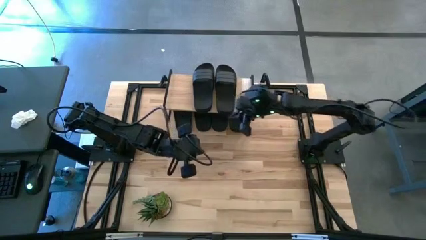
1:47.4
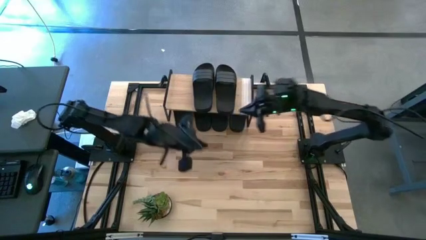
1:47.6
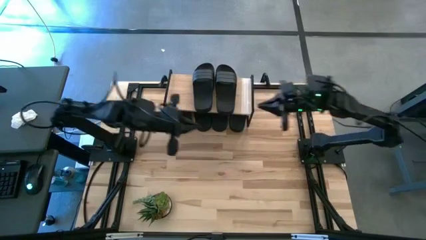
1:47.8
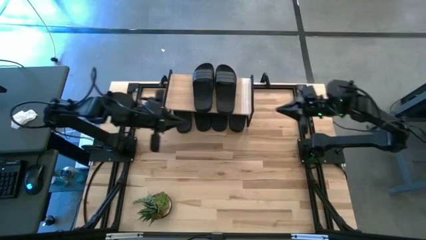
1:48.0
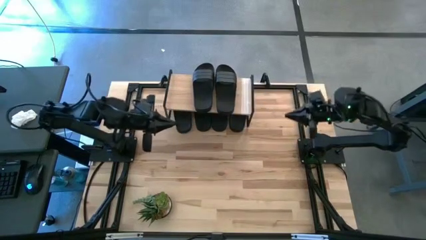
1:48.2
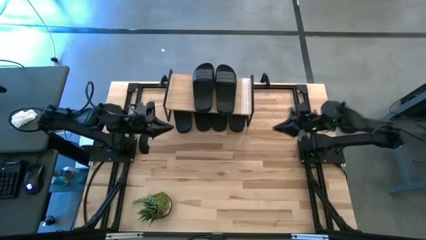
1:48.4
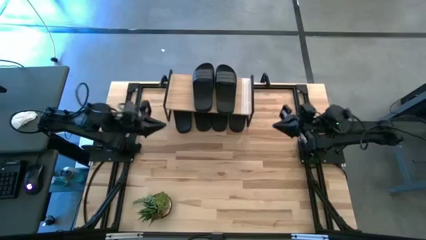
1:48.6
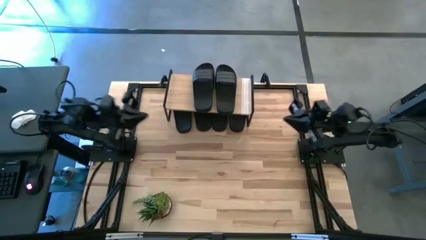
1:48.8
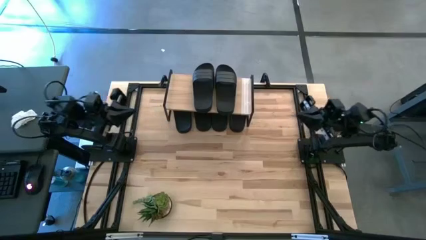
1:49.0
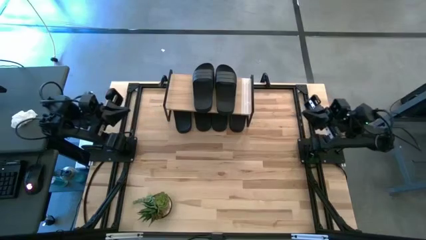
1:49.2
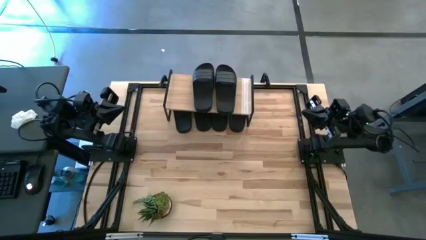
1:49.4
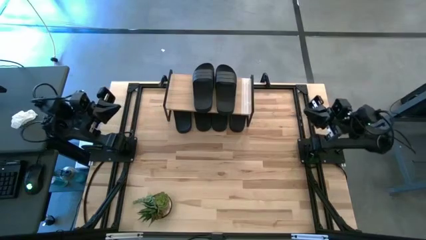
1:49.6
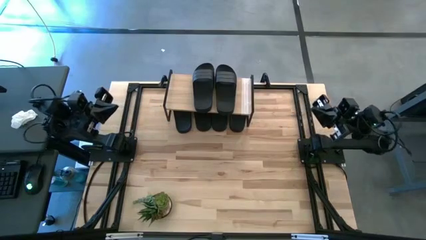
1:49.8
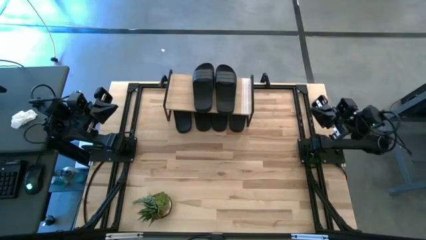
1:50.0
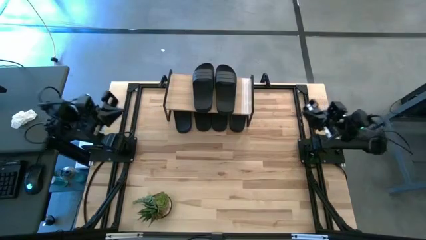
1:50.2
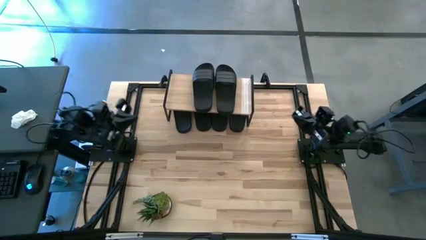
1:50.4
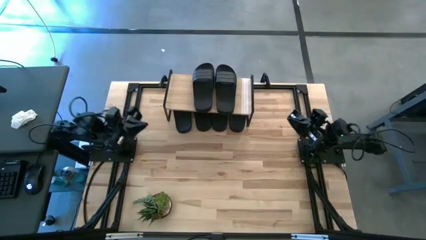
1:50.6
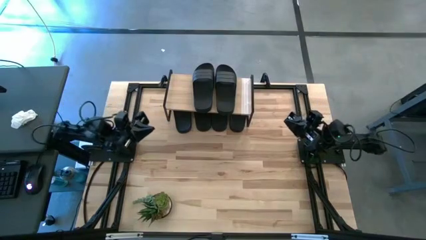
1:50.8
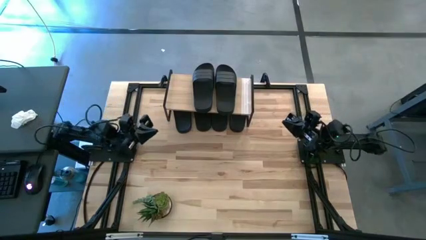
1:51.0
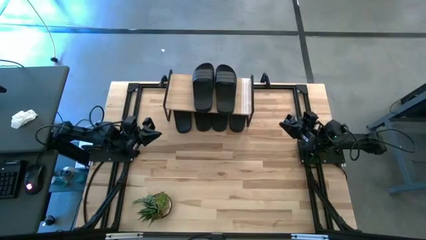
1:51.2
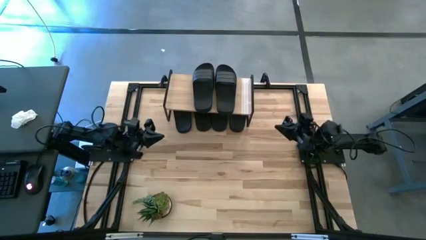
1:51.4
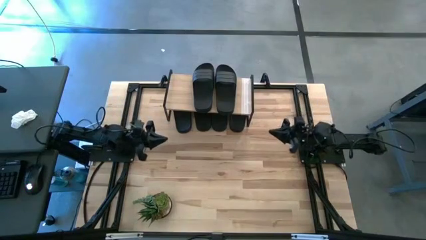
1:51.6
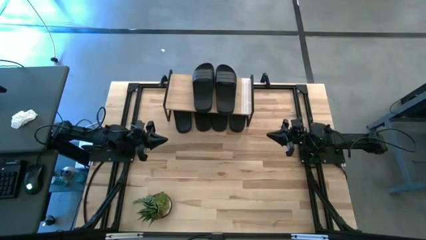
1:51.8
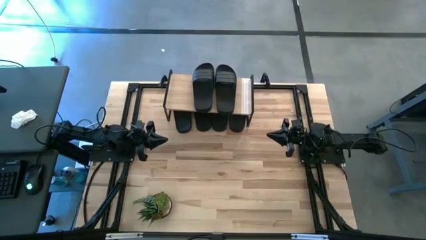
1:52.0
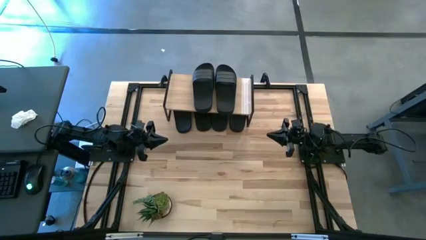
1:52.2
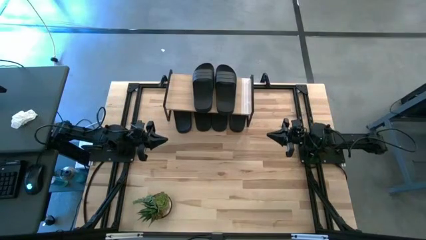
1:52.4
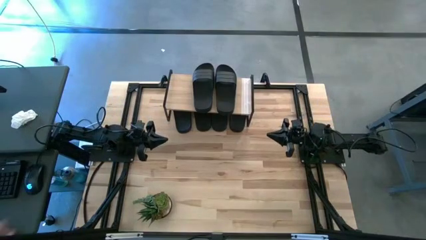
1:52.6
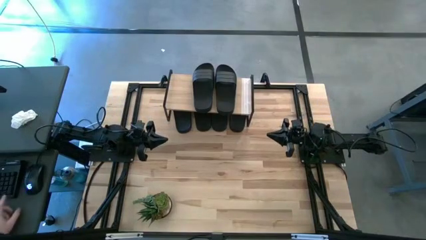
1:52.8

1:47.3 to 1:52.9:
Task: Pick and place slides into the shelf
Return to Home Position

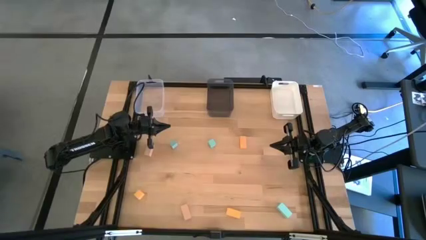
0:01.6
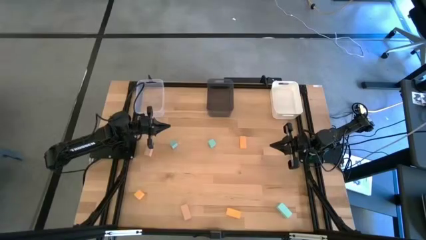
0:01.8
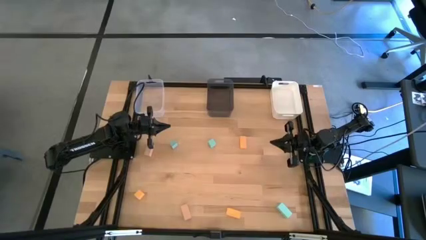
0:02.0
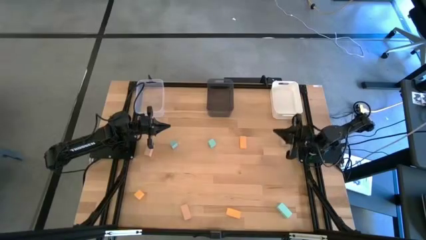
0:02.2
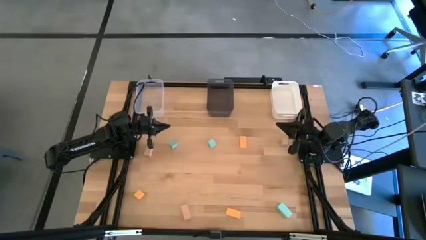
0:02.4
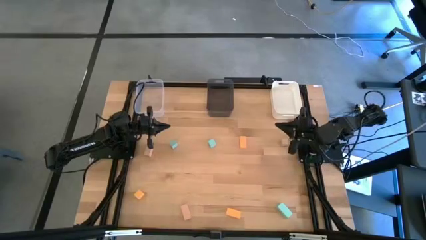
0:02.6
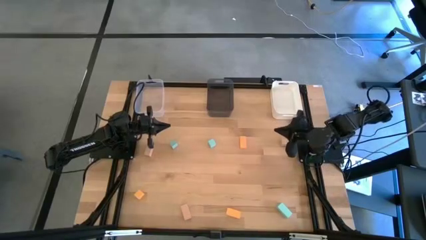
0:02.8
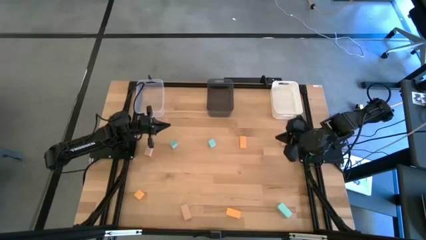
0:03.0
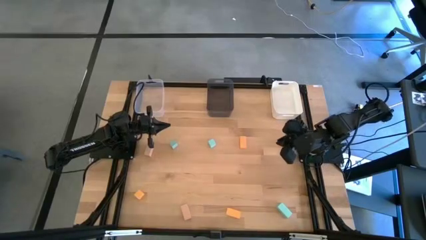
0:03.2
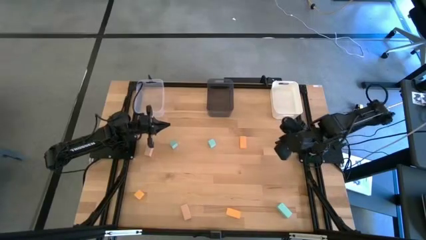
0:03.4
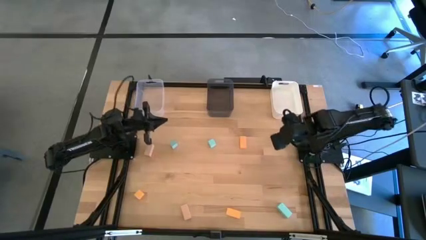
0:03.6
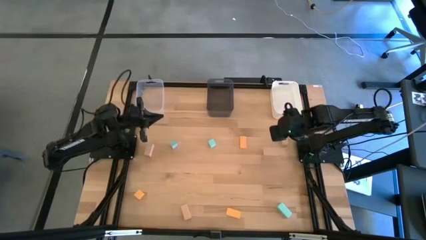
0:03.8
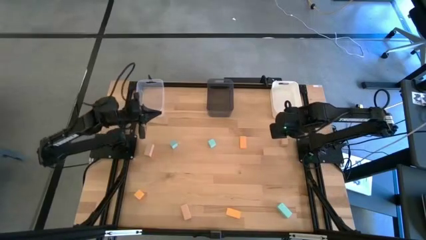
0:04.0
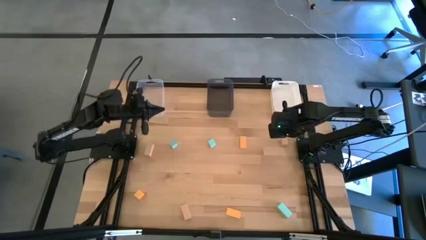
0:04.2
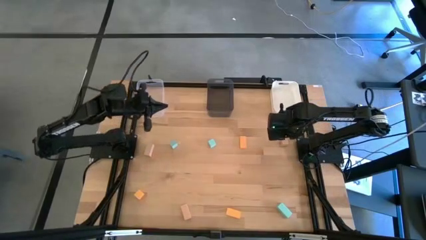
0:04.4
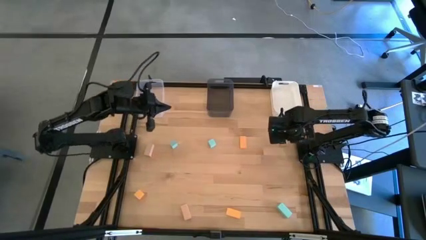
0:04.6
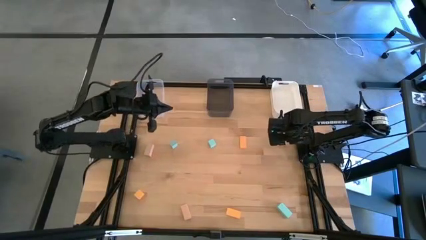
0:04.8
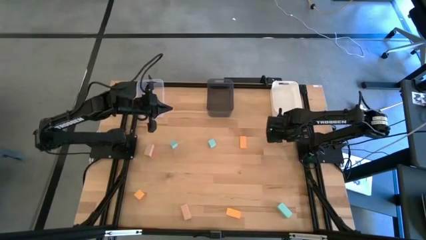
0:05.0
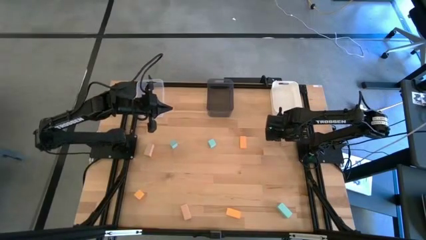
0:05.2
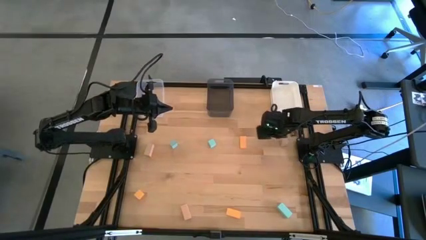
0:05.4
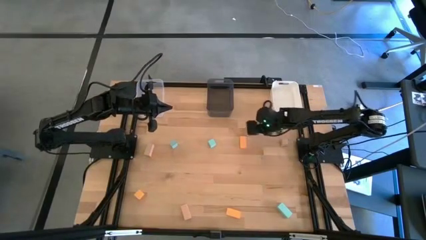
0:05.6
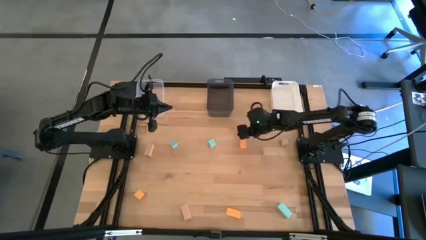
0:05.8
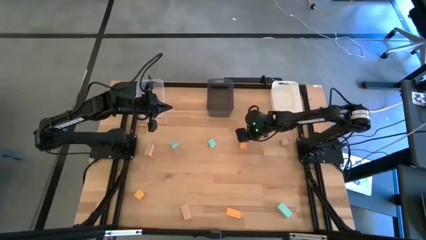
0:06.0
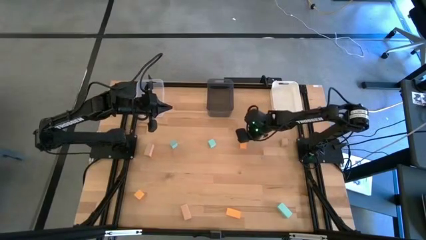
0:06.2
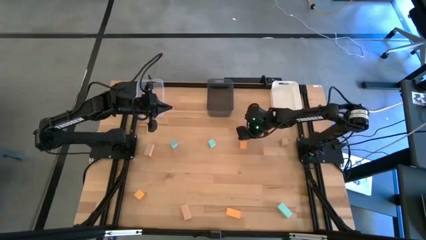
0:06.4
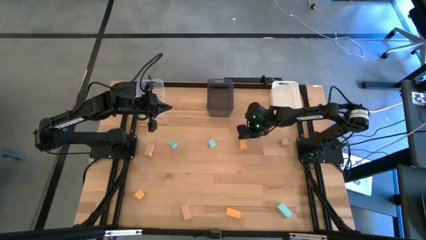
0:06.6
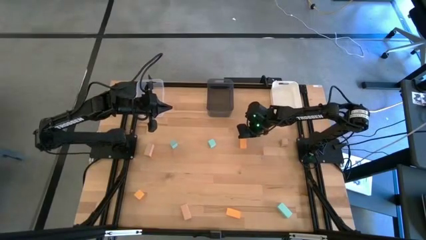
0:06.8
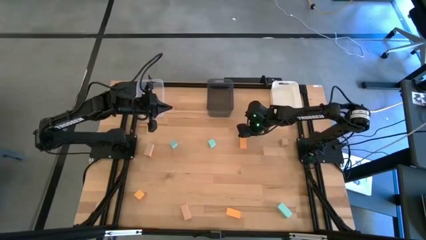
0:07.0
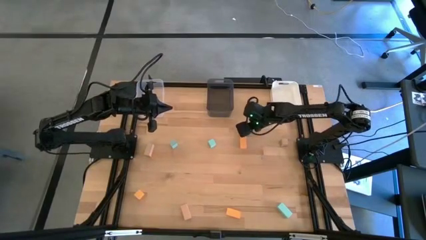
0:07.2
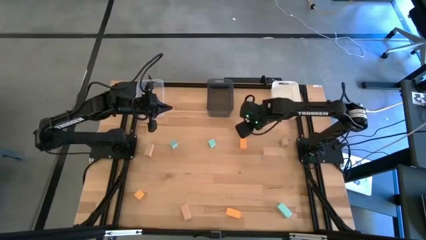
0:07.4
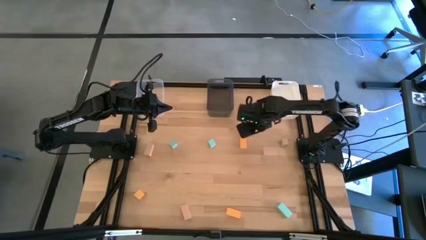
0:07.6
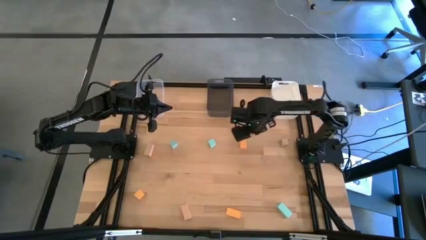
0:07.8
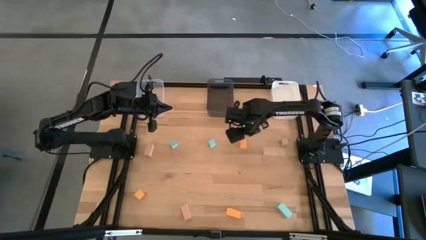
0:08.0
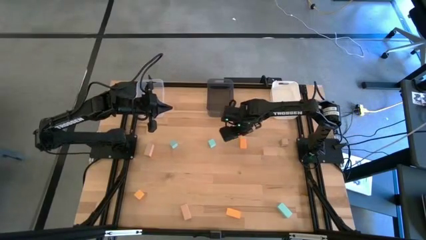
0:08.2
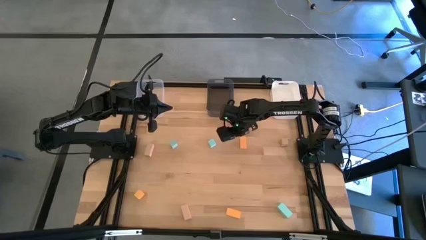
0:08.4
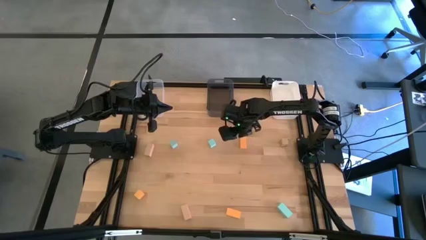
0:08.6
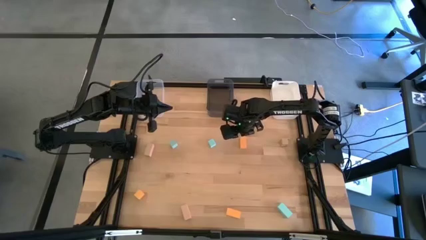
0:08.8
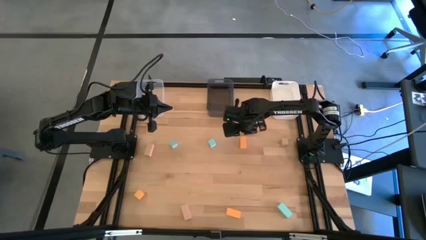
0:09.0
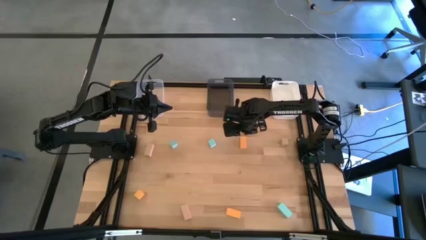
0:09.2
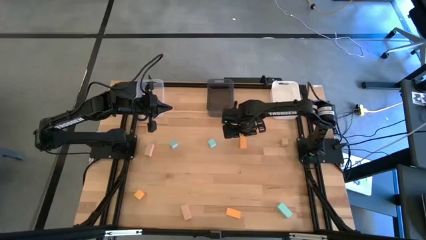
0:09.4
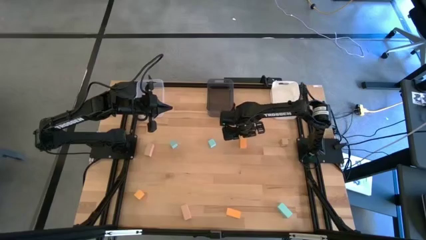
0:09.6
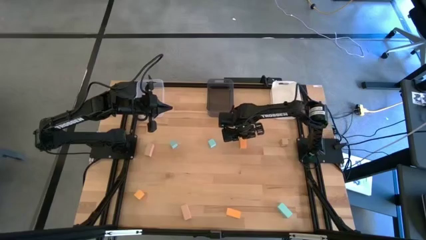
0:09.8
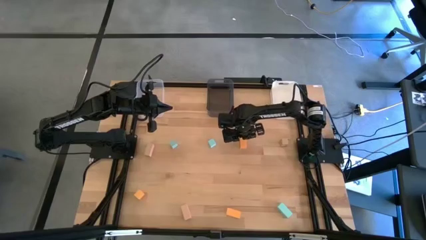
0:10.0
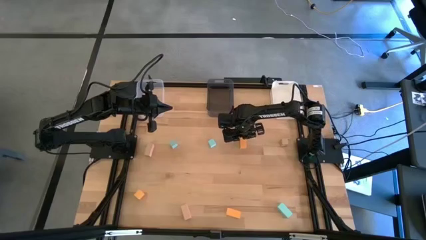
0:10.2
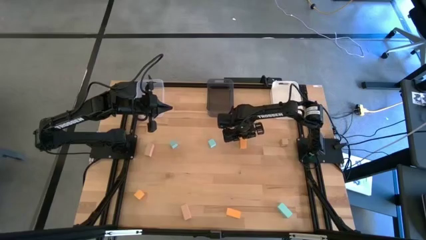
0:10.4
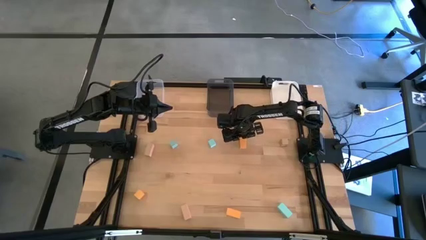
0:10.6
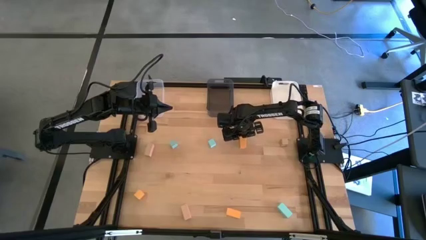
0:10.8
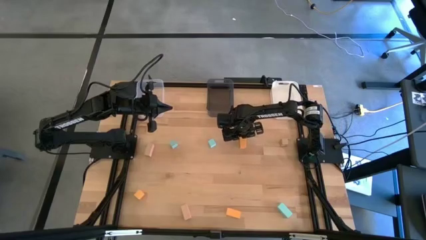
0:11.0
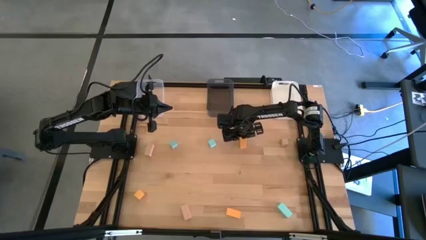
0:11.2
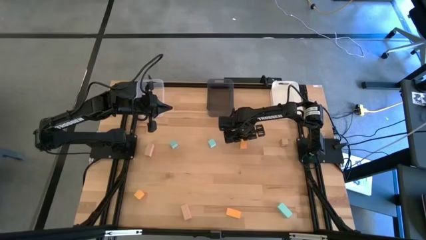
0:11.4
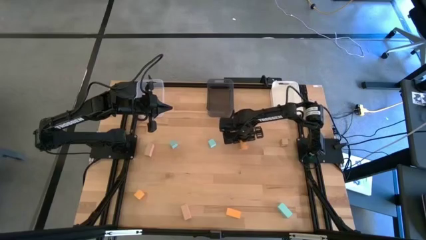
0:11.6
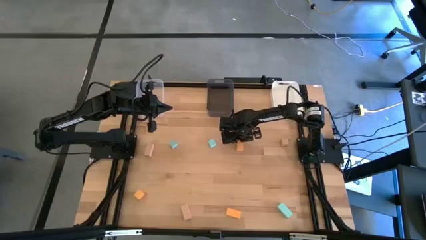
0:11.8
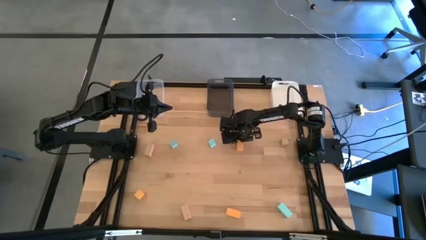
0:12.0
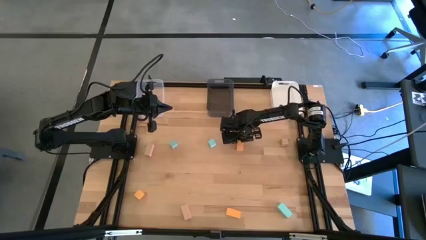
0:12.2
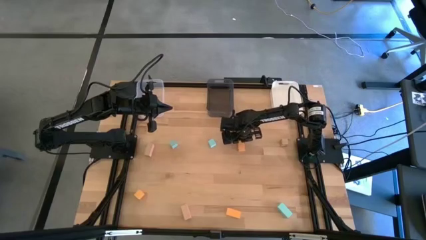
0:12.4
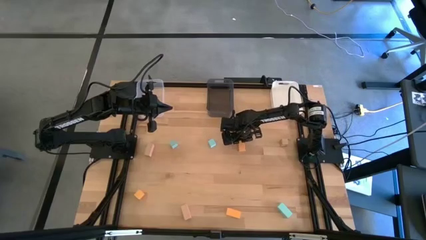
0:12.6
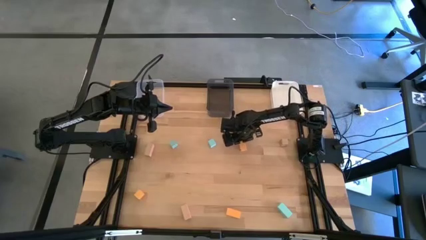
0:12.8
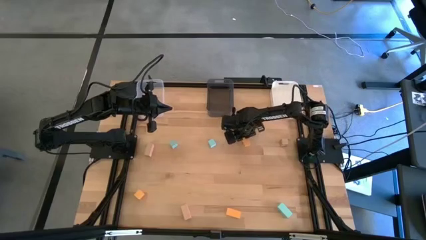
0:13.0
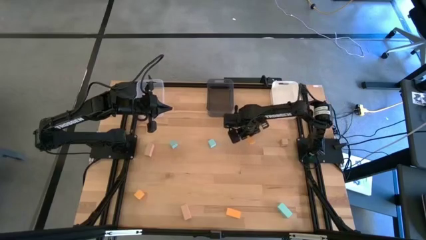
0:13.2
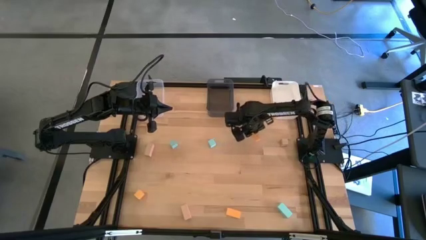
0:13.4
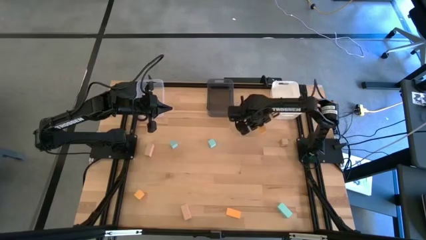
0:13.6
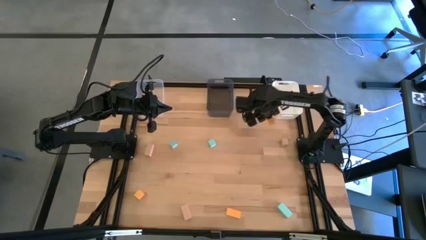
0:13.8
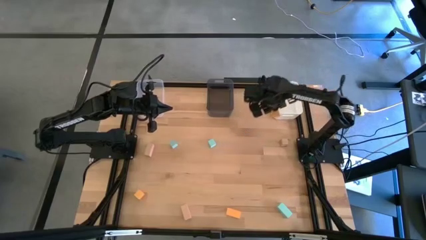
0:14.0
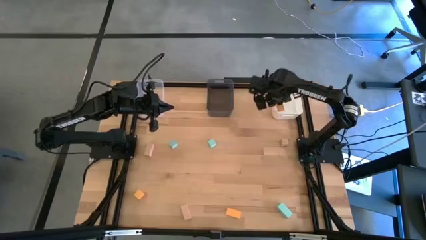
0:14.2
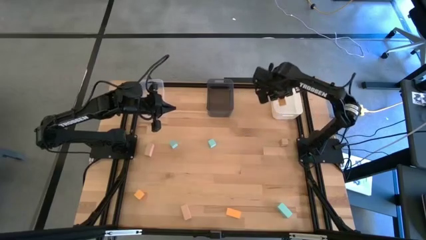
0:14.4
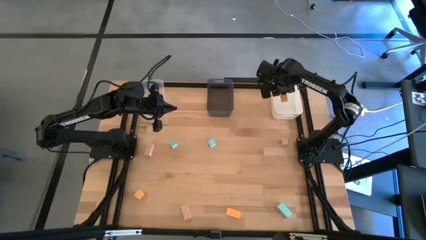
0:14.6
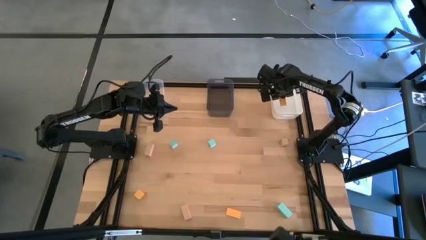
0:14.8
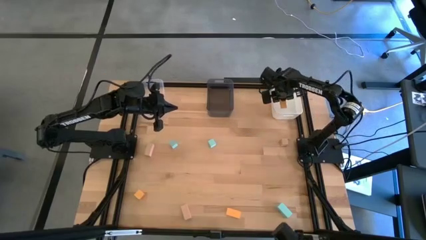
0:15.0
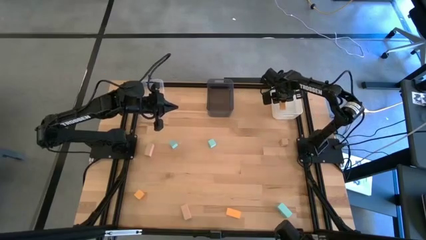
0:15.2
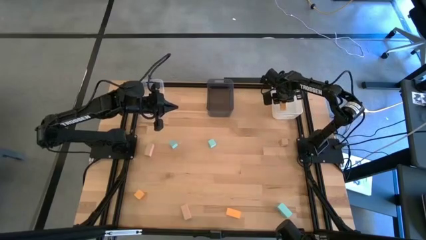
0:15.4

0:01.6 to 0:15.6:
Task: Sort & place blocks by color
Put the top orange block into the white bin
